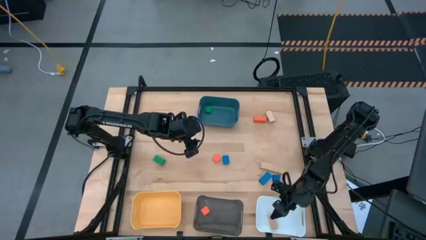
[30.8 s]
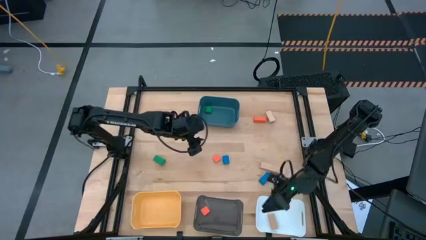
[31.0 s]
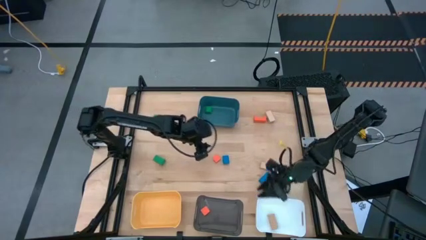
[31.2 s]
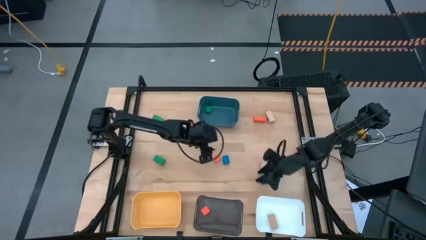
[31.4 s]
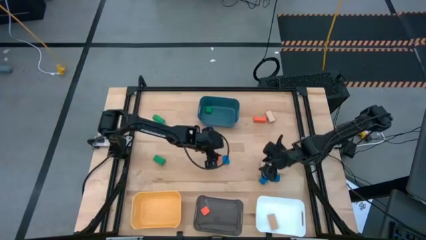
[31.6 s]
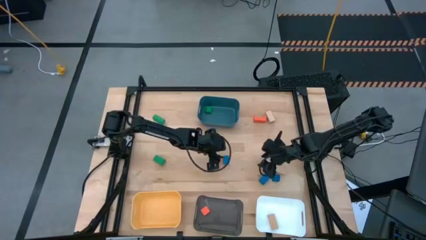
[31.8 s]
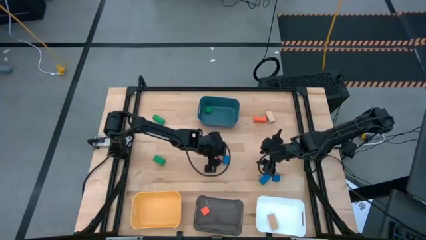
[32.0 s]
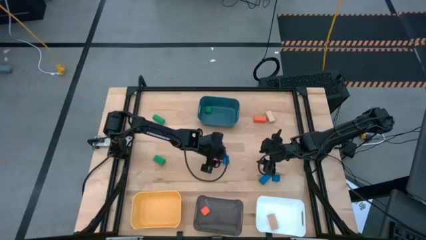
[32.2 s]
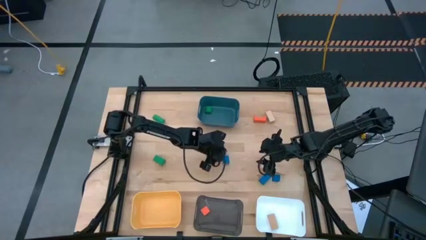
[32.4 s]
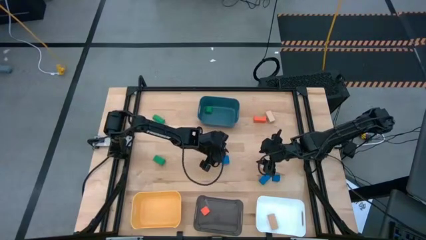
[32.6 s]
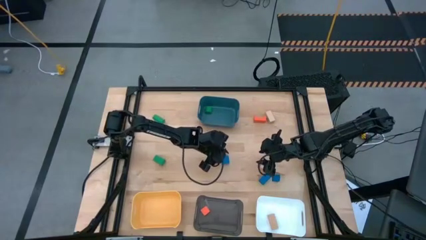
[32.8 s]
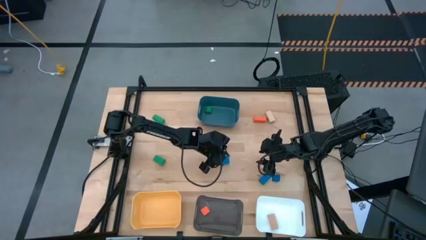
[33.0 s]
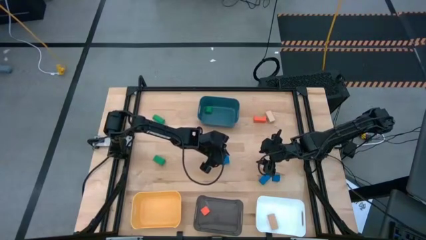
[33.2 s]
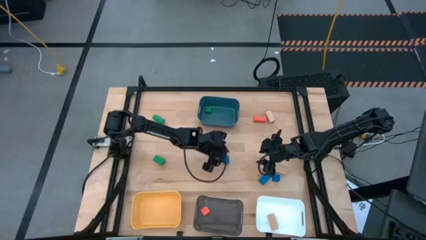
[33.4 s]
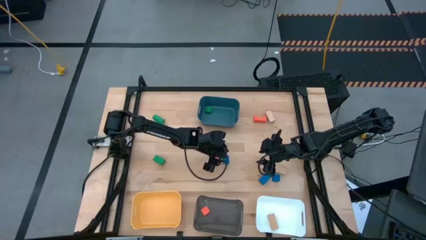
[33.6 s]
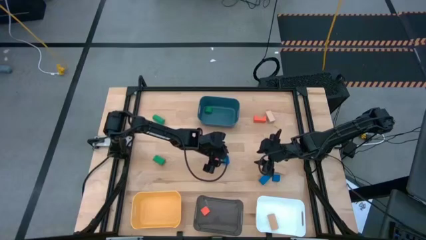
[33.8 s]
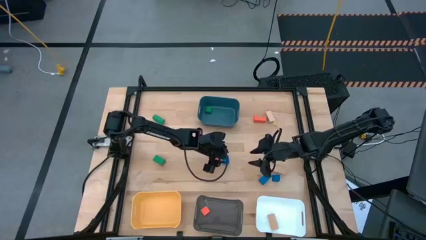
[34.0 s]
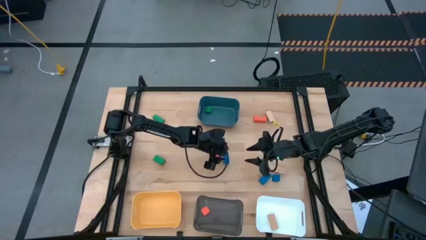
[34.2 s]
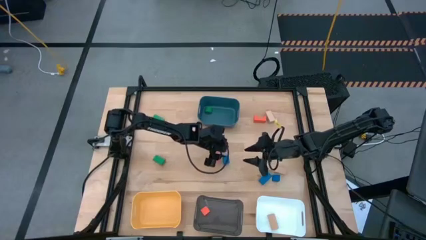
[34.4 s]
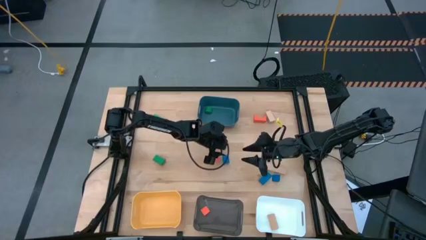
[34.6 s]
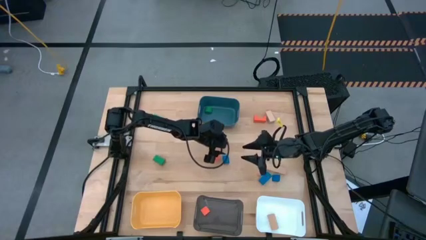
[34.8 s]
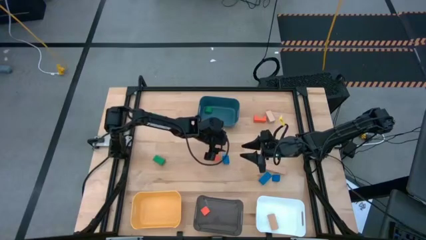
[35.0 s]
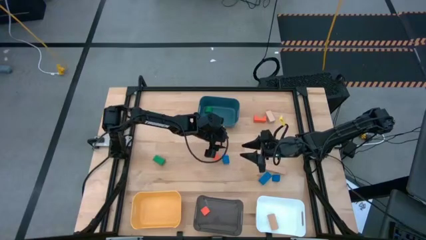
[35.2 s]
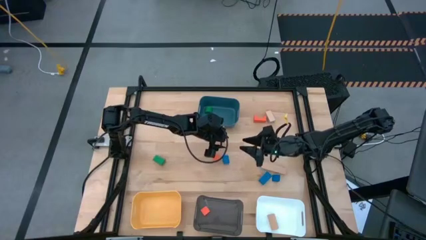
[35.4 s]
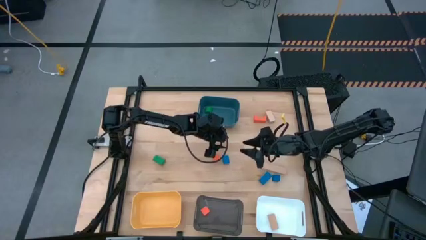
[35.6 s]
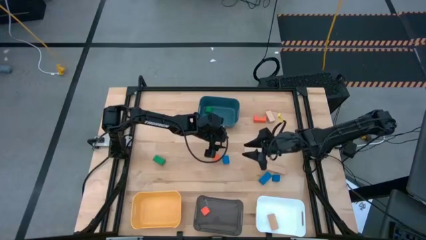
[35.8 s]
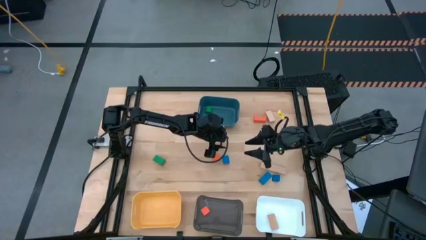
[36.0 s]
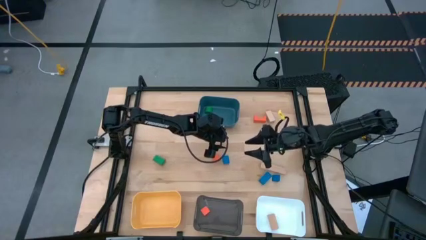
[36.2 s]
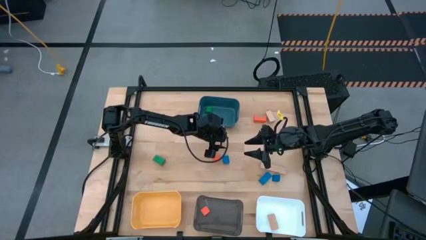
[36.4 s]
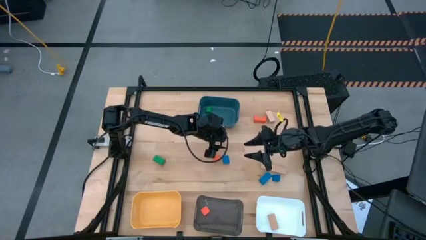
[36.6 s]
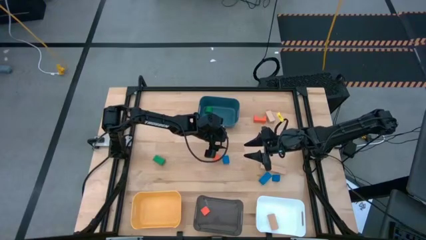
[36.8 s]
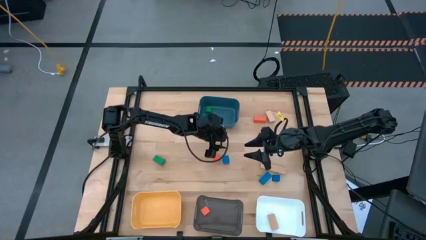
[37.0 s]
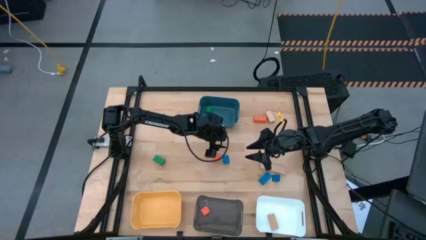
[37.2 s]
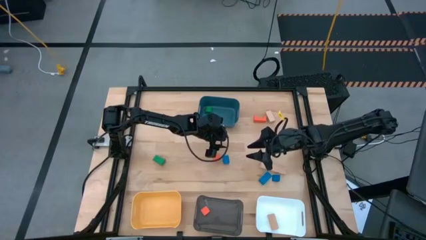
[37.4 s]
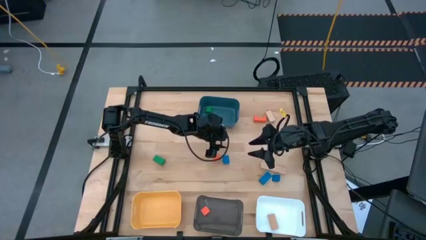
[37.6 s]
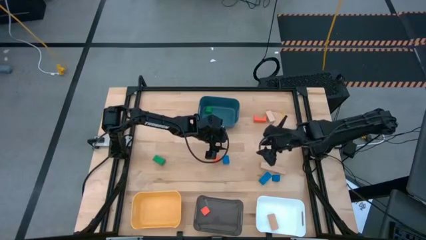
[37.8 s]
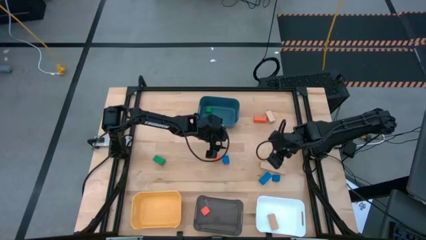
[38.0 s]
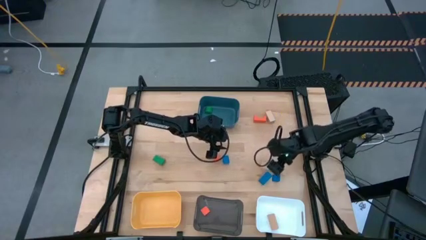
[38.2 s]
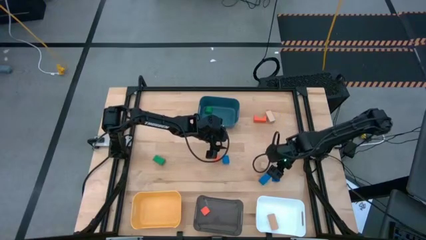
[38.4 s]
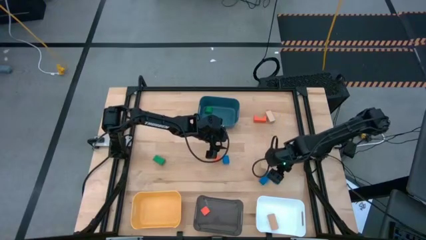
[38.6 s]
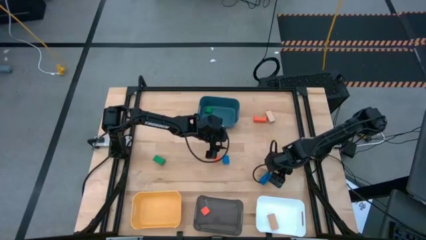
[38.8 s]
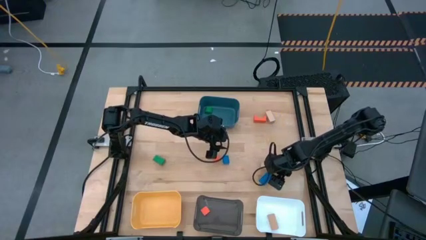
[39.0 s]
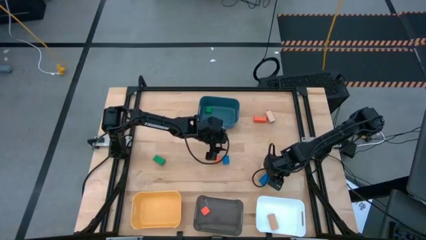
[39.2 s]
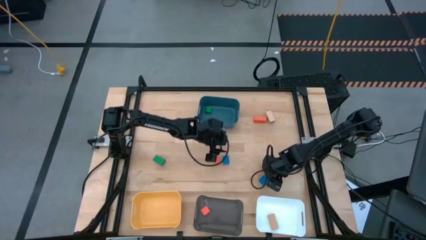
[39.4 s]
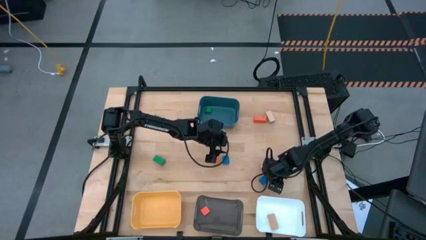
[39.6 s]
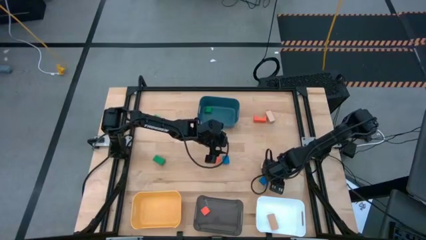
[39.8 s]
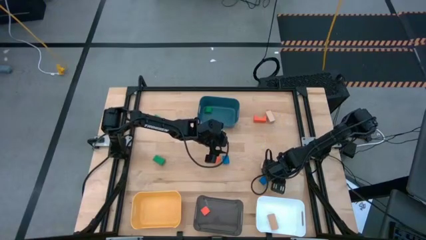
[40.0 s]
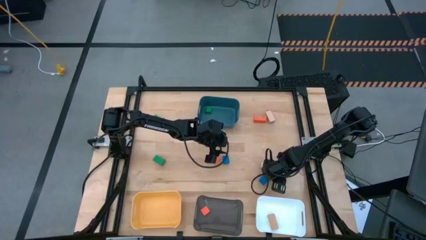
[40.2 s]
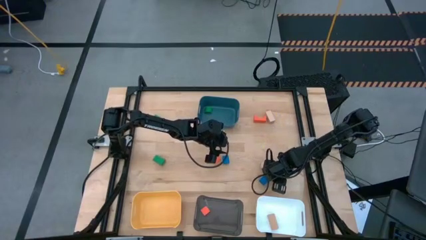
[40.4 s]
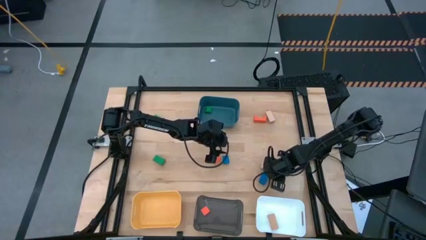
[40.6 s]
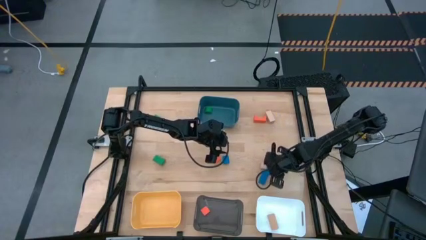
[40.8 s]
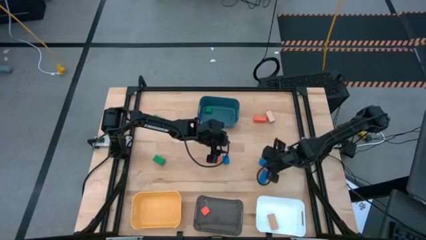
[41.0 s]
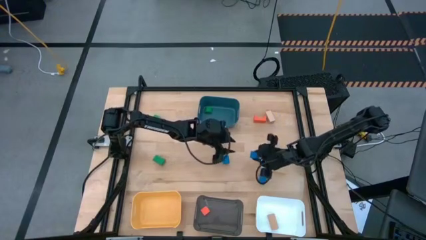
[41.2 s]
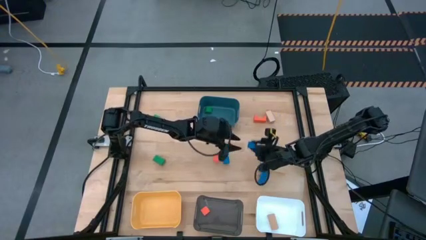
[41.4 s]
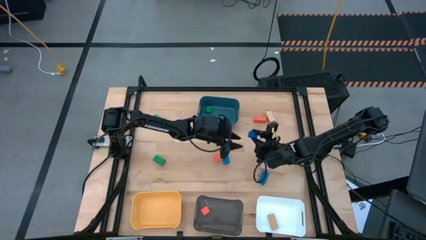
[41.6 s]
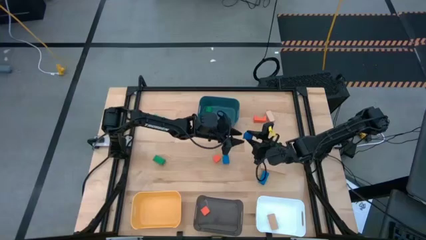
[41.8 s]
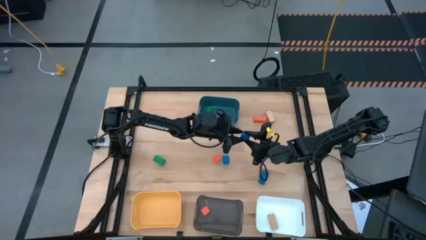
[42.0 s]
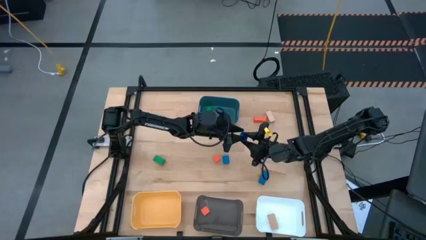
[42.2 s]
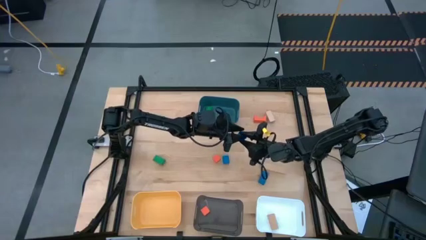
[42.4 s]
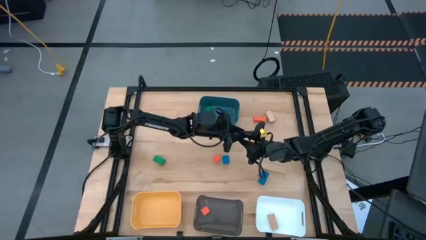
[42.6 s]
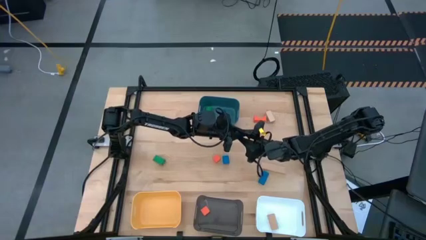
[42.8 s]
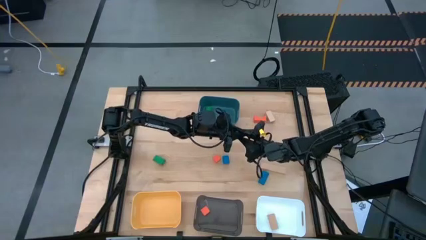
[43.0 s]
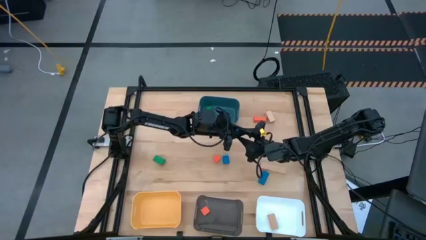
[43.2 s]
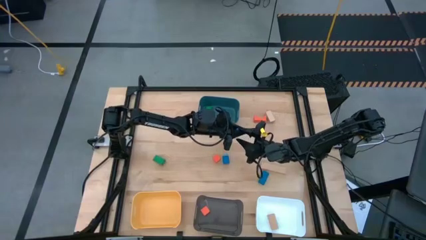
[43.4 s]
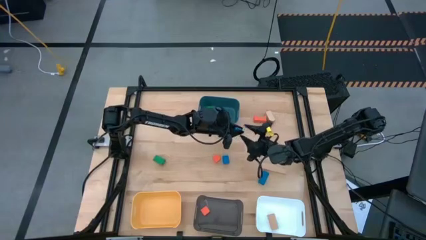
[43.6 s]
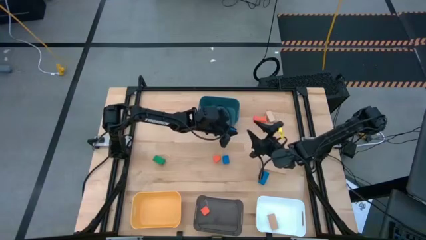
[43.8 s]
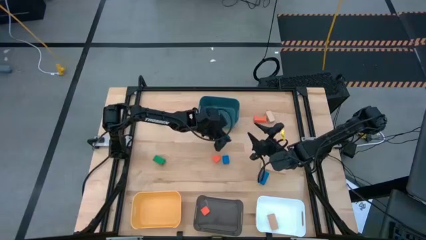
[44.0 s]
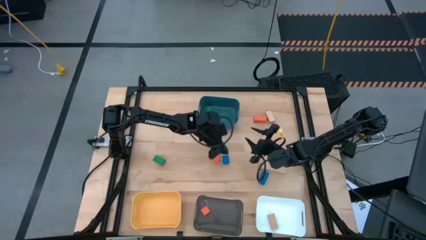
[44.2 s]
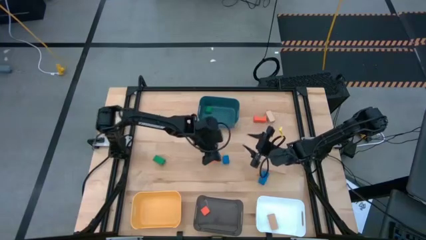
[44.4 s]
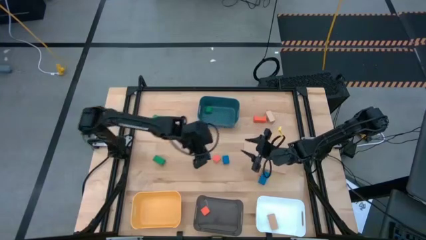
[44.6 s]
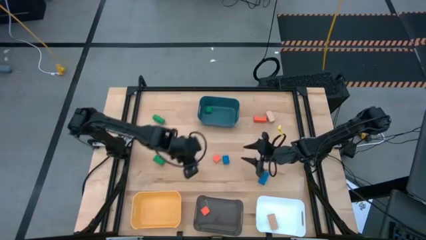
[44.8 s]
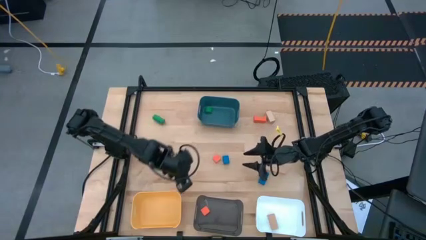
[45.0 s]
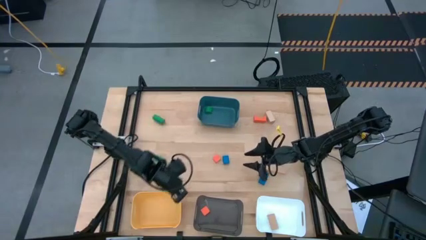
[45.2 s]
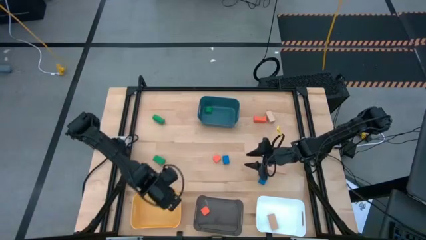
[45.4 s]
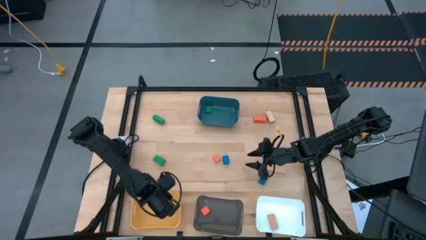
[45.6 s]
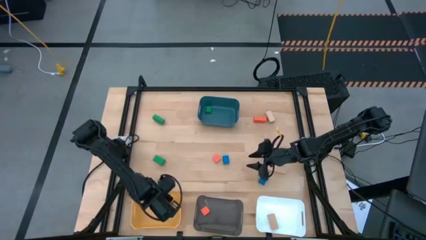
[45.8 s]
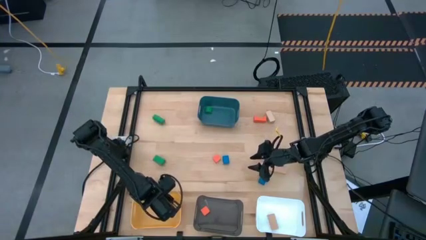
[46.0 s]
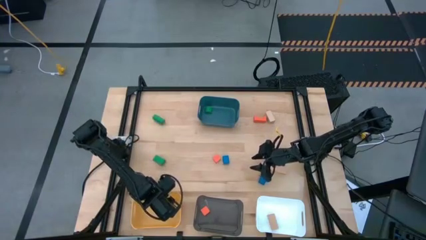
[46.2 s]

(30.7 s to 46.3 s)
Task: Sort & place blocks by color
Put the bottom right blue block into the yellow bin

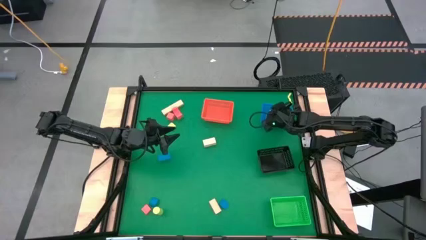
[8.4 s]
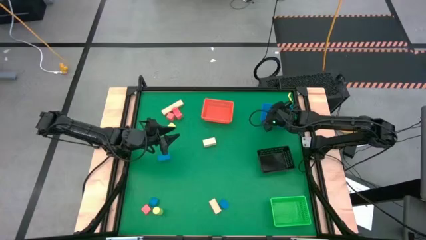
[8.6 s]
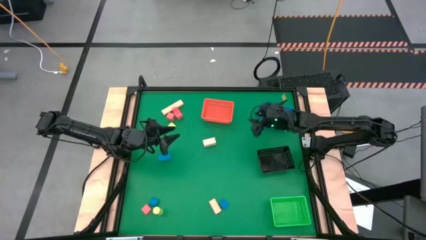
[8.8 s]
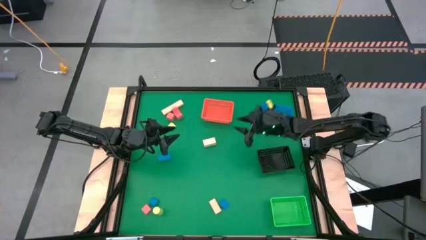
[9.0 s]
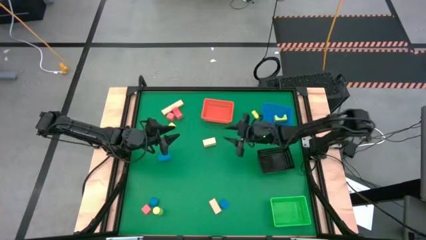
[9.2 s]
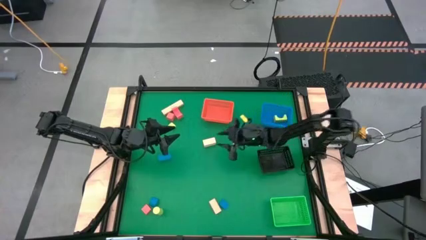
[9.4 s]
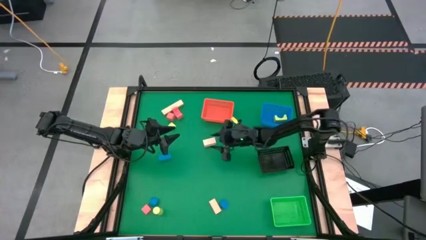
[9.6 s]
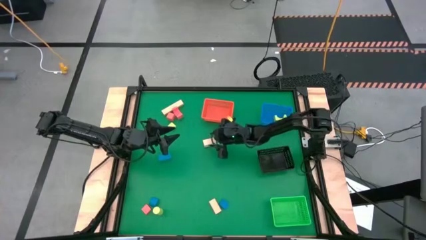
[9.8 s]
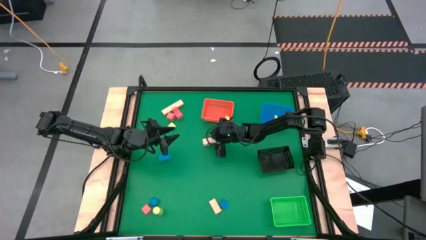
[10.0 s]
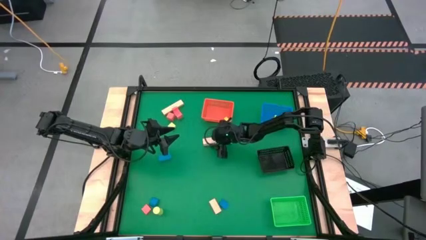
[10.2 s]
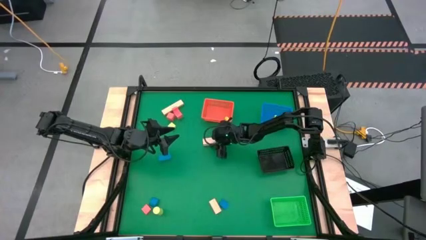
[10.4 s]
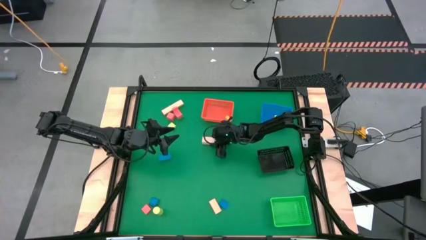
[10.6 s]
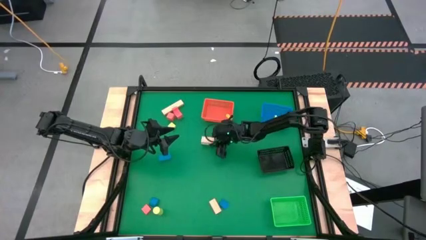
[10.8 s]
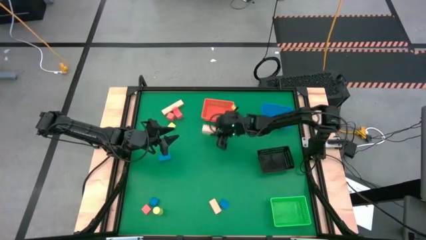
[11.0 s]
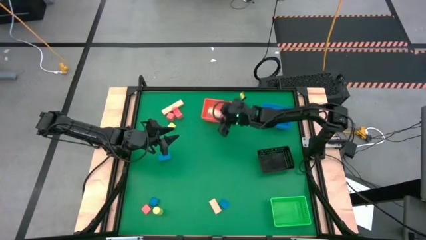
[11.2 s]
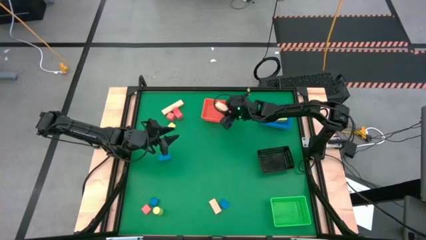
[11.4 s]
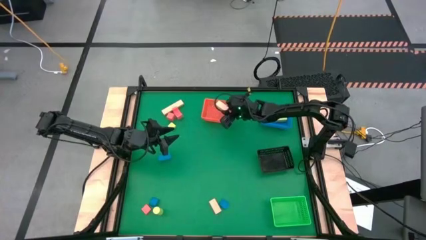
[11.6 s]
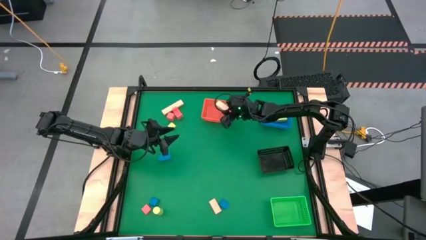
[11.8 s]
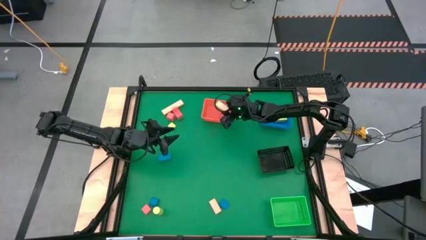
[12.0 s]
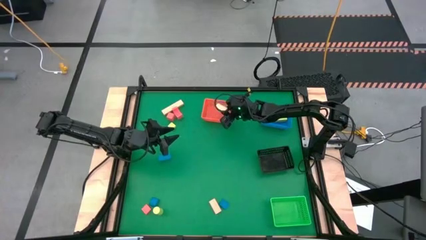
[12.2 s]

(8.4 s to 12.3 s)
Task: Sort & place blocks by color
Put the middle brown block into the orange bin
